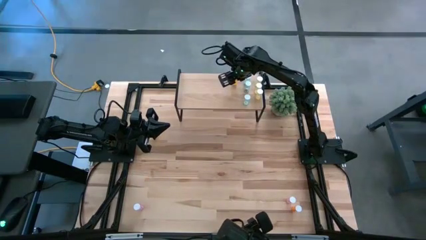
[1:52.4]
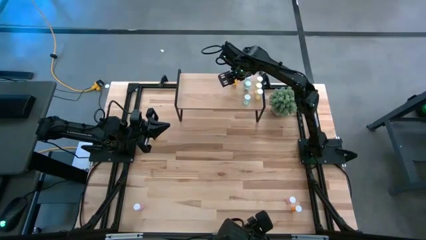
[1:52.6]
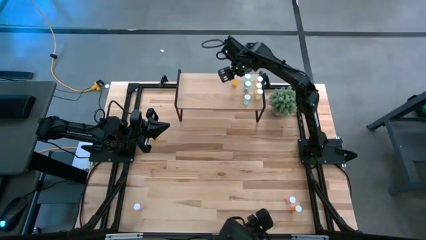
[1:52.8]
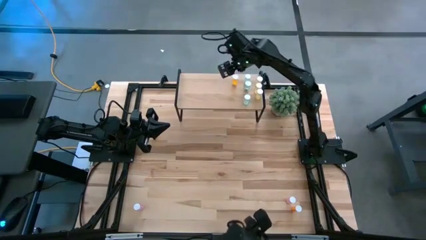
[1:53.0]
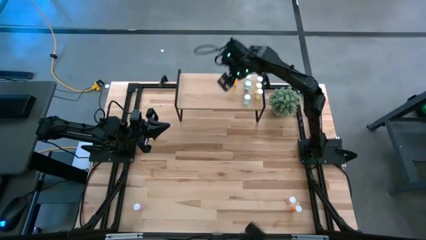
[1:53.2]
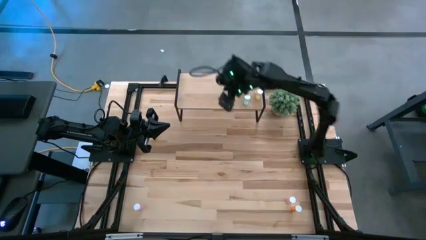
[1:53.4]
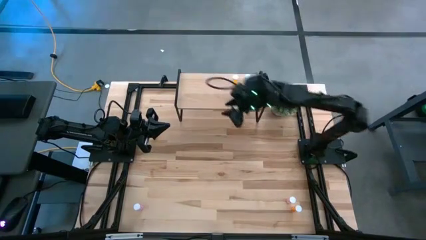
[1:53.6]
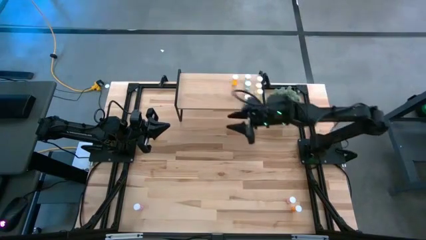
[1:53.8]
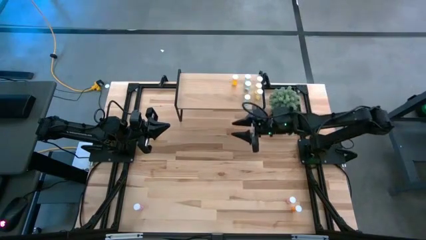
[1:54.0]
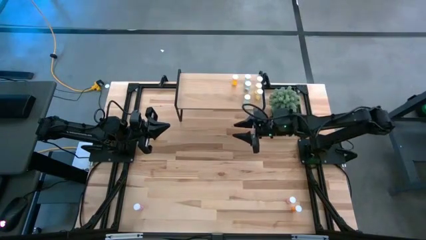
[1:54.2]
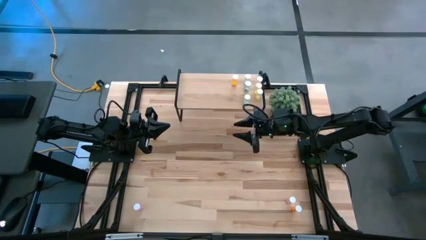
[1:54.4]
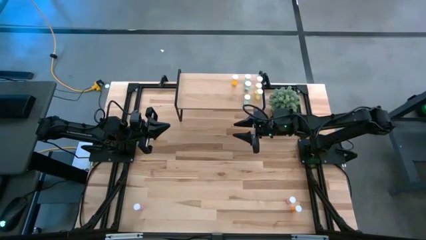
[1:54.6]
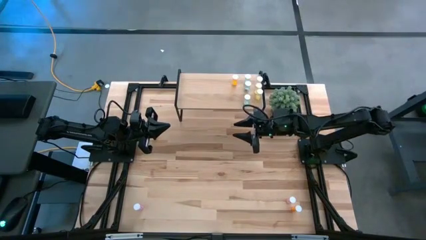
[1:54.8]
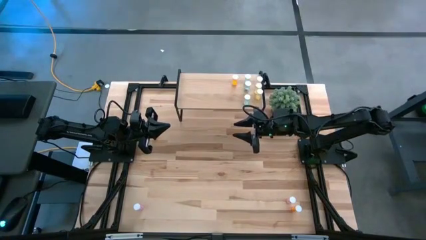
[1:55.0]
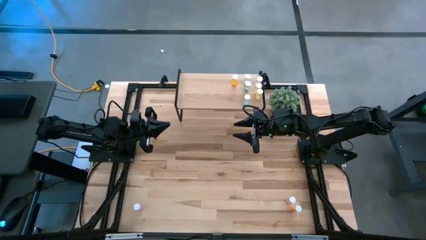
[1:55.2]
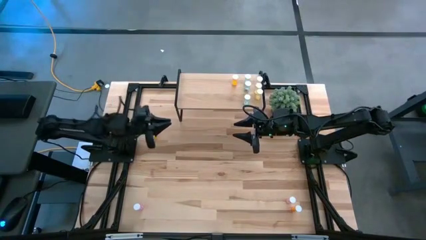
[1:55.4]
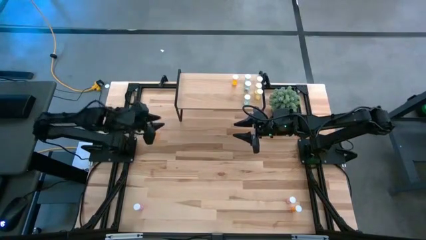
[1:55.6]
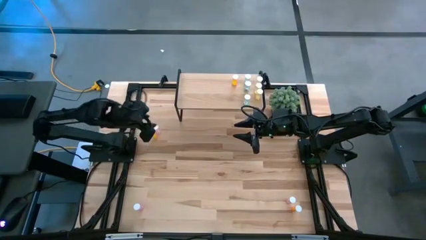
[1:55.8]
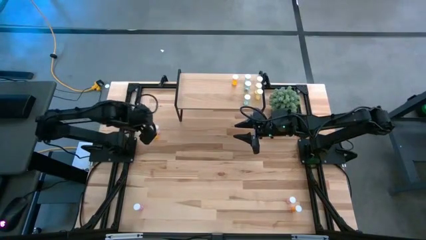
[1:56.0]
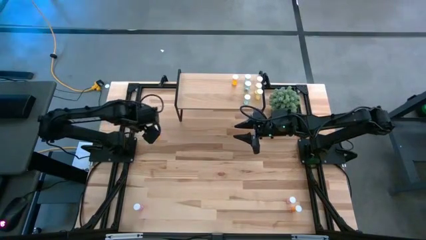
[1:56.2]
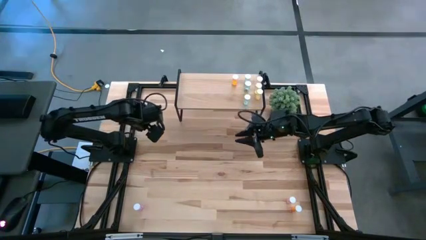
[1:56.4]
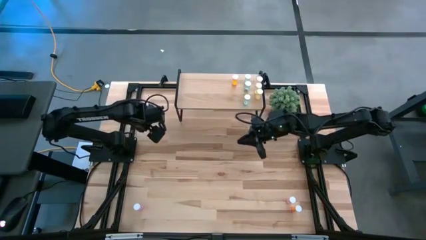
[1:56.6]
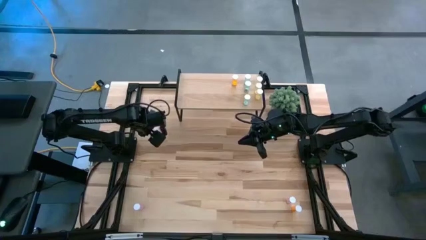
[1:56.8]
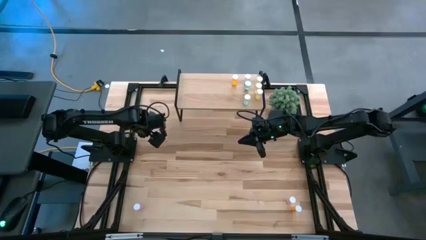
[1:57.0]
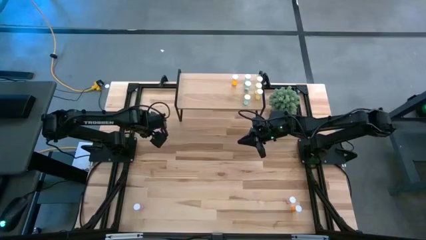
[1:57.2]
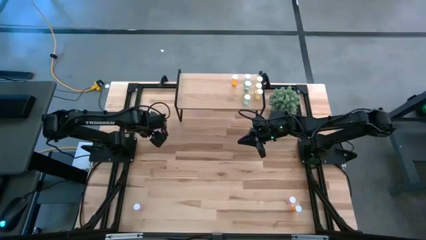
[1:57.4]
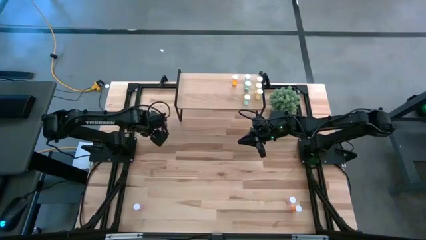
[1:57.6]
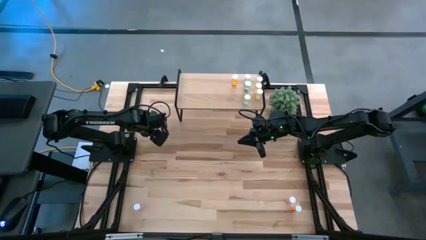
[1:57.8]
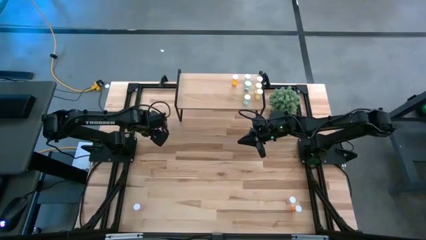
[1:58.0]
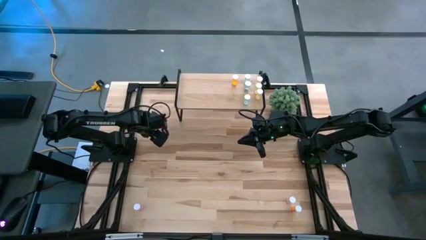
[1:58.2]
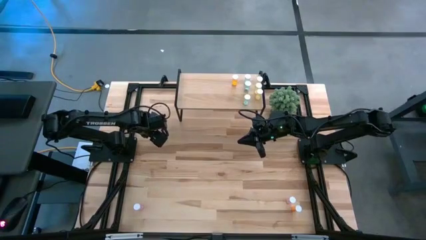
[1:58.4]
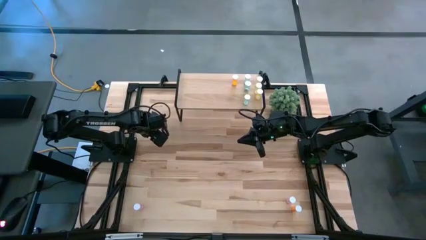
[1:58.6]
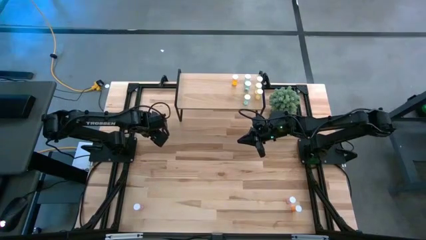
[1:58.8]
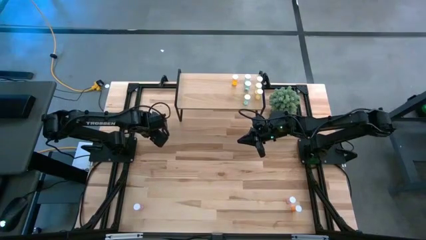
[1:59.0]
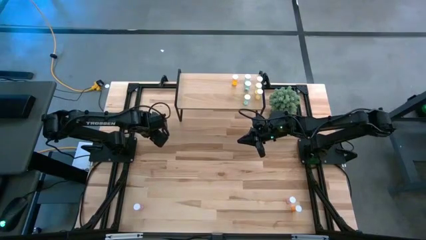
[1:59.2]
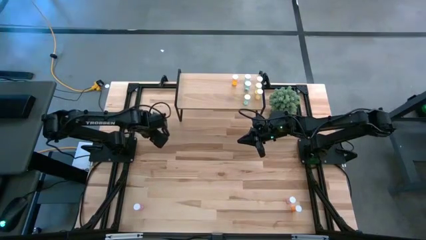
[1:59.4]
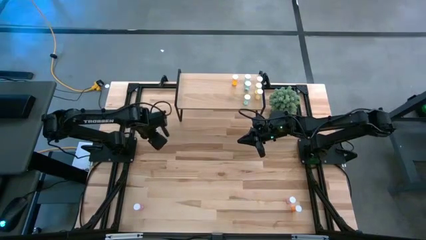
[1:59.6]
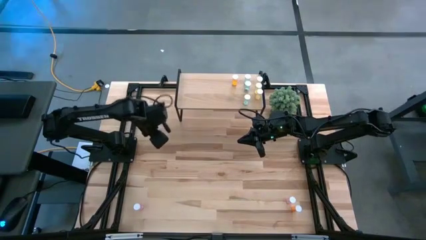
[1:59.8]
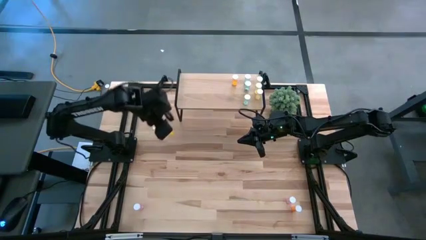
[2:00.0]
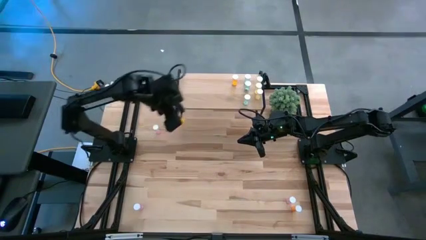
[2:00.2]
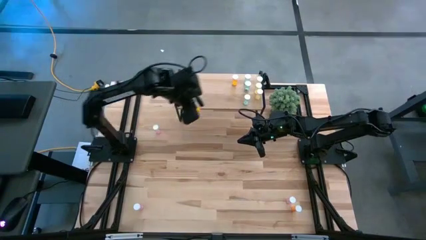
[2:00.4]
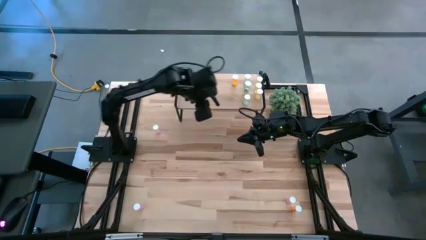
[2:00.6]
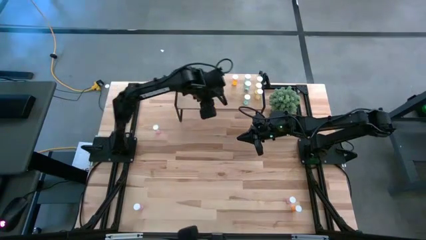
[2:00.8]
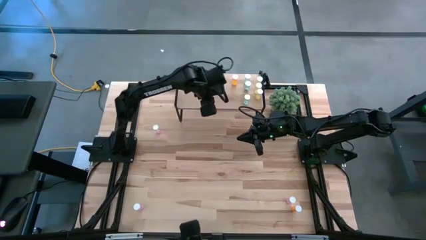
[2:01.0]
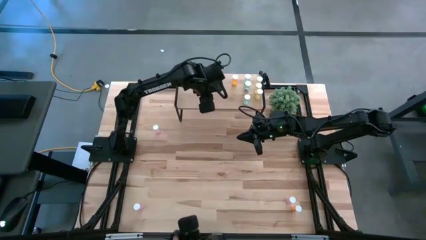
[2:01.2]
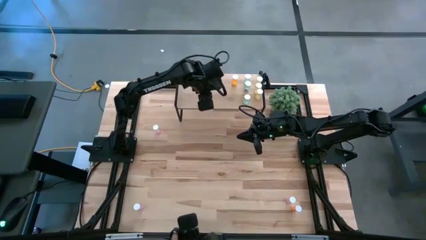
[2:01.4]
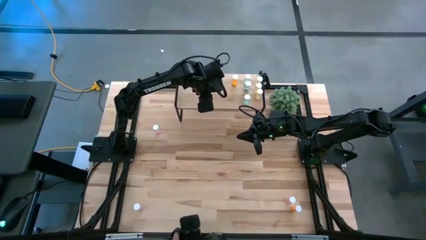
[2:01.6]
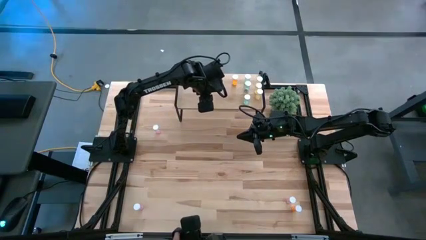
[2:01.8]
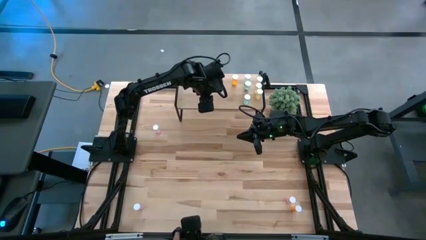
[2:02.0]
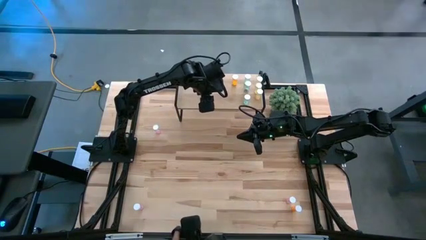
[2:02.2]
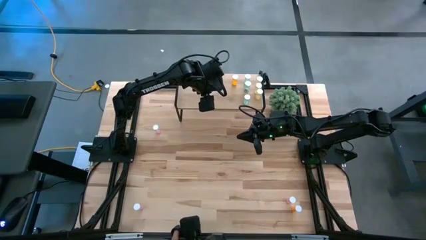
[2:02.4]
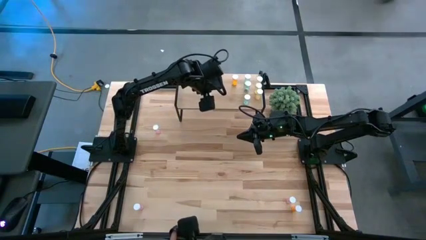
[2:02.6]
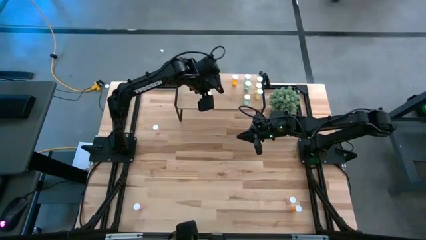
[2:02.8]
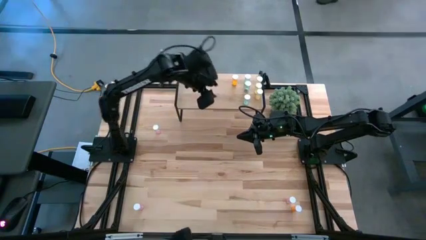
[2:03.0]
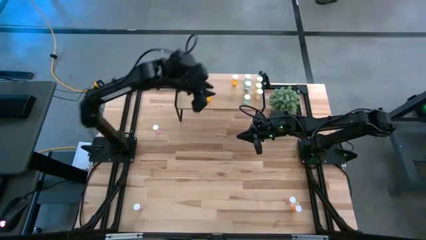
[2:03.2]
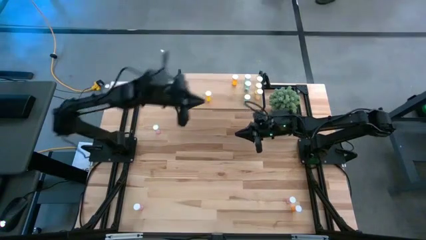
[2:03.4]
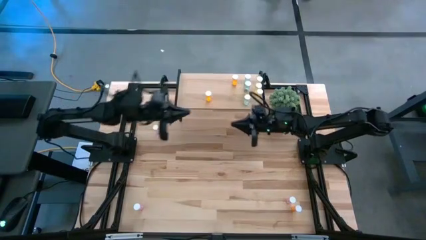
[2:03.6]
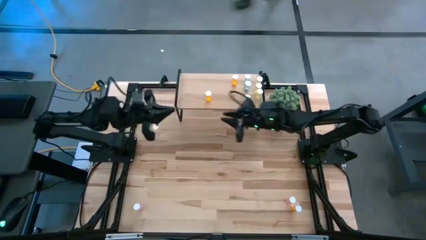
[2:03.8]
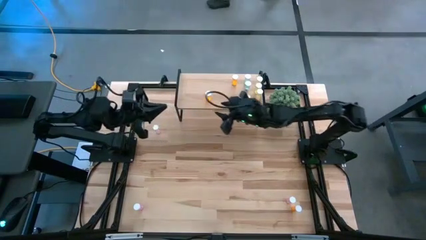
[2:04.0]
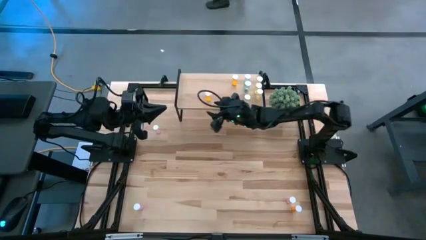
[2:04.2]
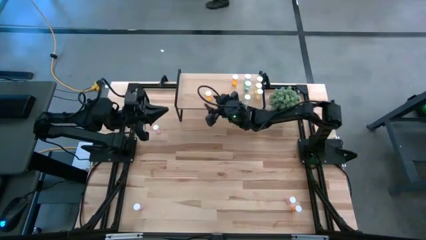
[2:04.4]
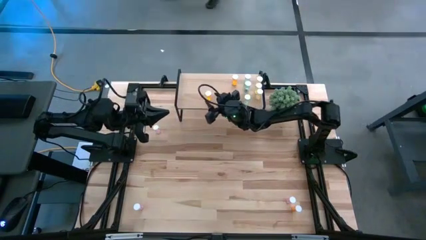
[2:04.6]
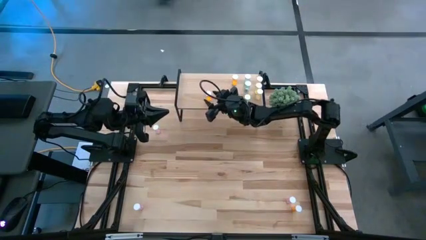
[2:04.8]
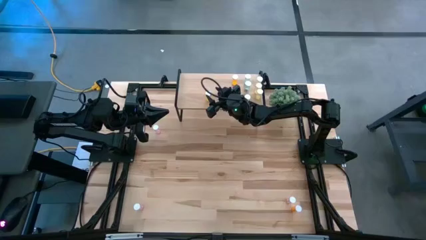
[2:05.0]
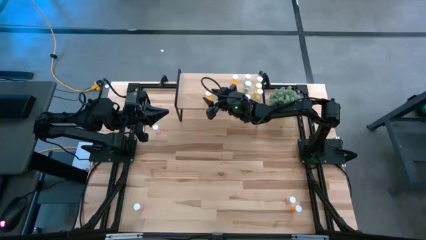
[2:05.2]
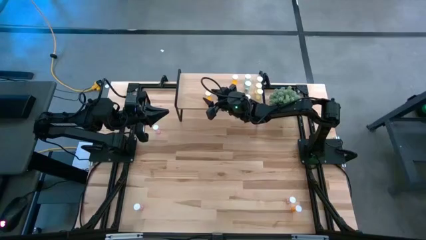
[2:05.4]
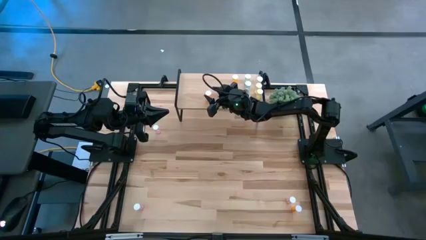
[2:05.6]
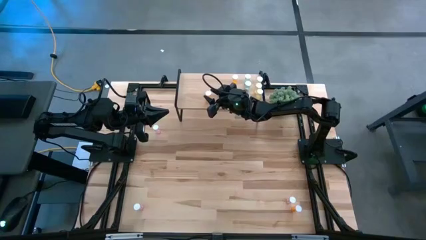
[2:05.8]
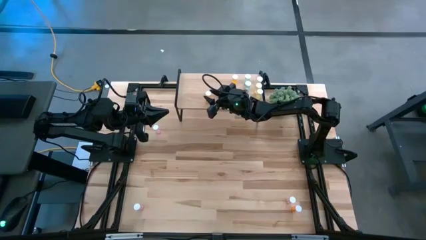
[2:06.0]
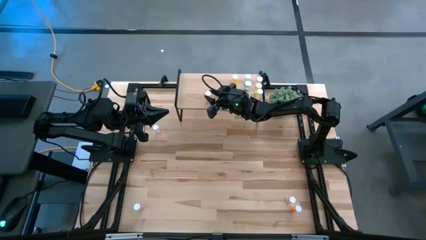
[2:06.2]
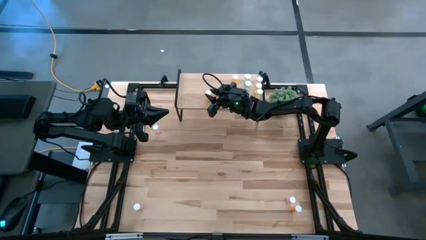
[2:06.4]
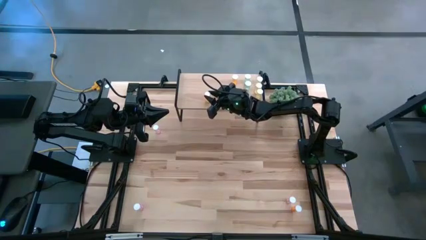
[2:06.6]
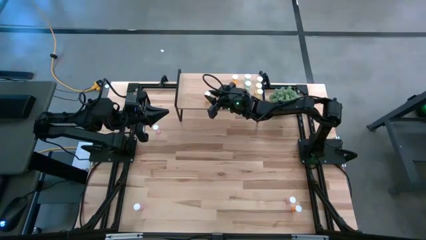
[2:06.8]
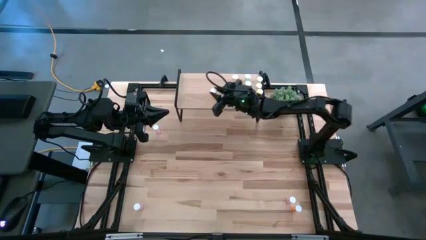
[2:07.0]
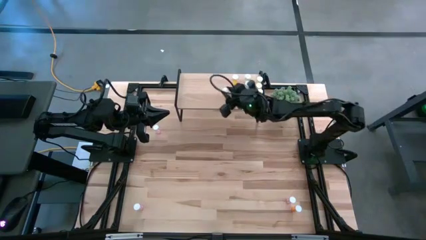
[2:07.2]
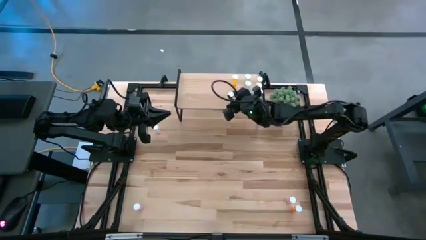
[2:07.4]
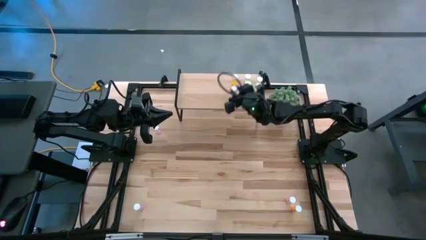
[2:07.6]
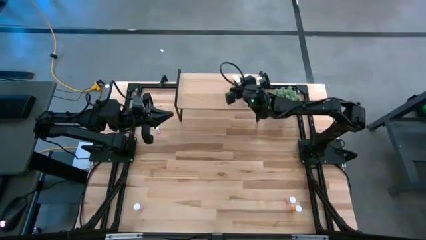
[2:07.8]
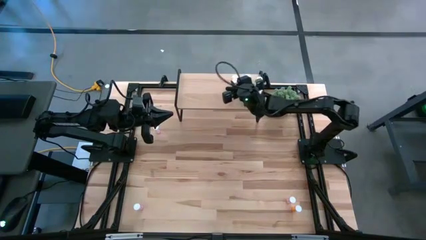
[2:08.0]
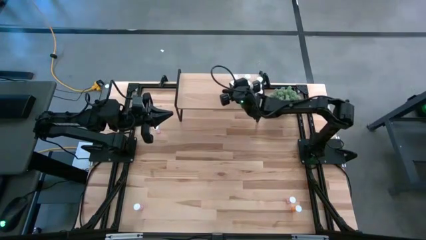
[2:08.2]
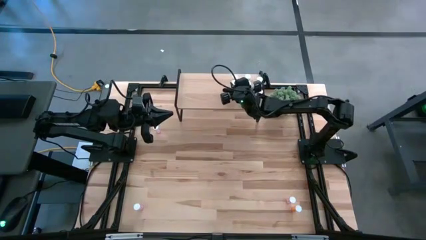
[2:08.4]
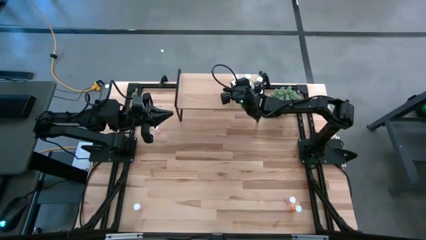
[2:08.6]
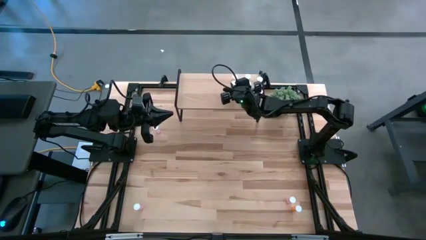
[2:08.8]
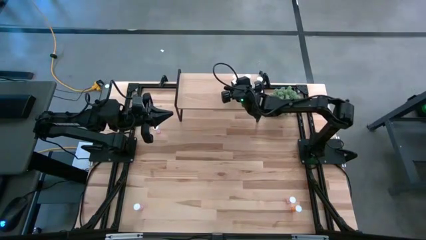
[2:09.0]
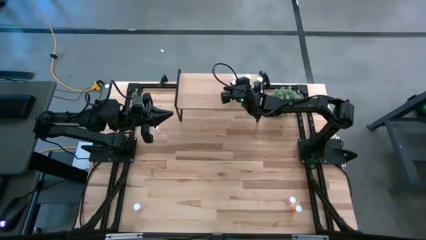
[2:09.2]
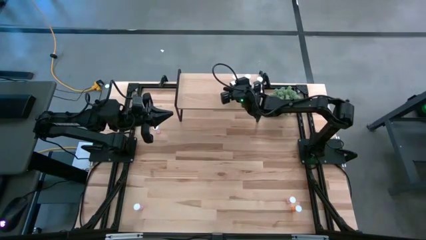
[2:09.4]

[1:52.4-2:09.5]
Task: Pick and place medicine bottles onto shelf by color
Put the top orange pill bottle on the shelf aligned with the other orange pill bottle
